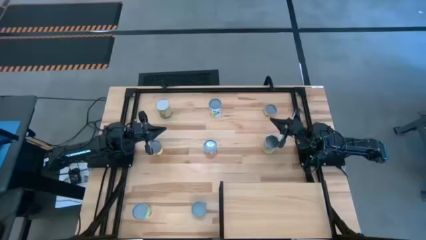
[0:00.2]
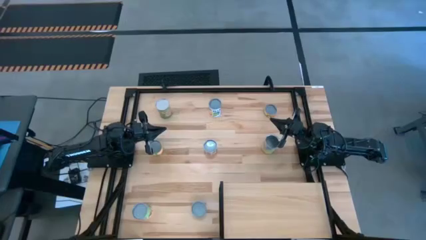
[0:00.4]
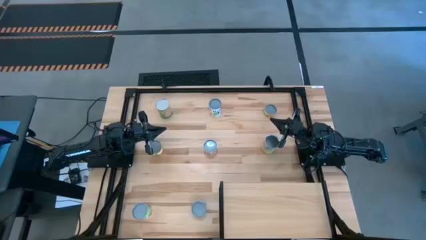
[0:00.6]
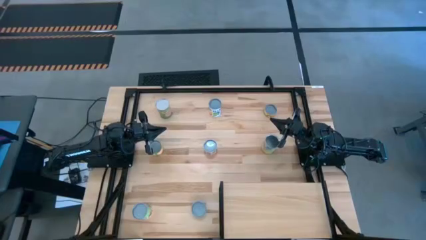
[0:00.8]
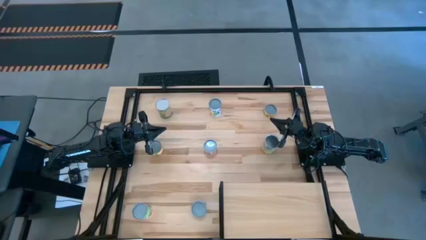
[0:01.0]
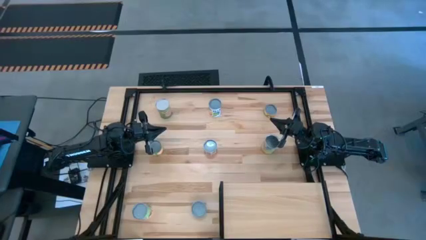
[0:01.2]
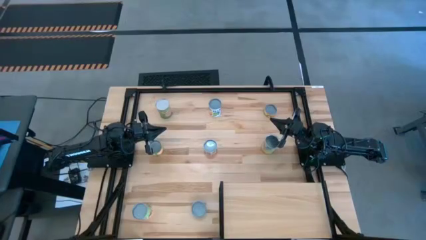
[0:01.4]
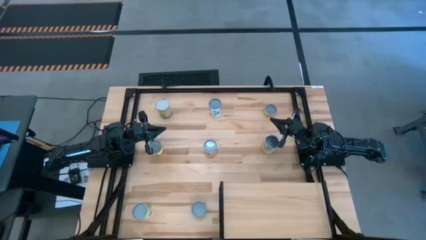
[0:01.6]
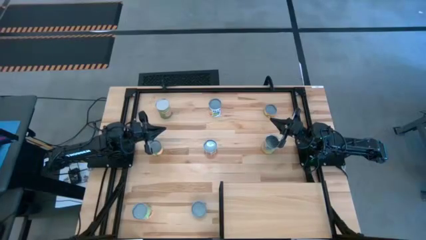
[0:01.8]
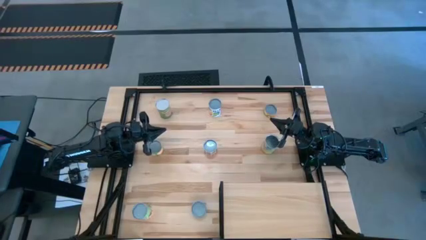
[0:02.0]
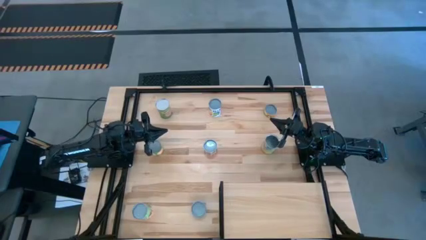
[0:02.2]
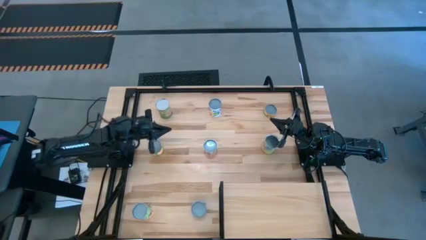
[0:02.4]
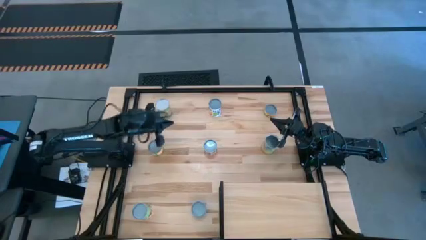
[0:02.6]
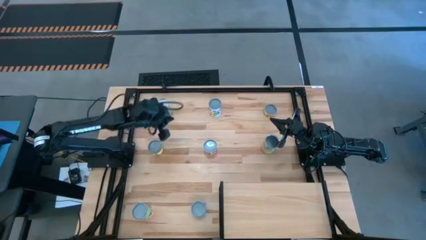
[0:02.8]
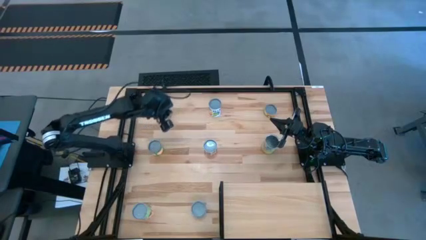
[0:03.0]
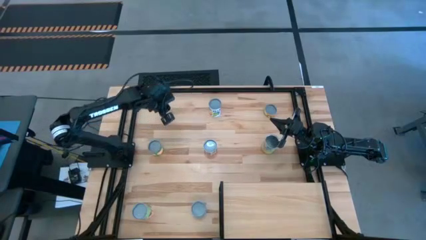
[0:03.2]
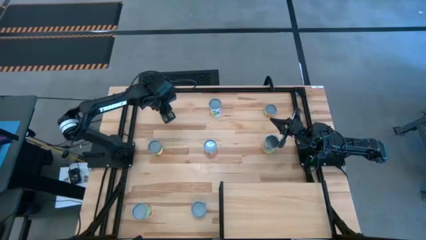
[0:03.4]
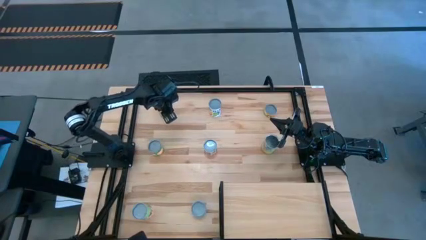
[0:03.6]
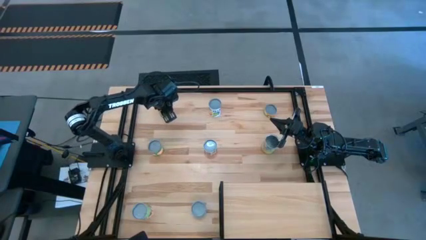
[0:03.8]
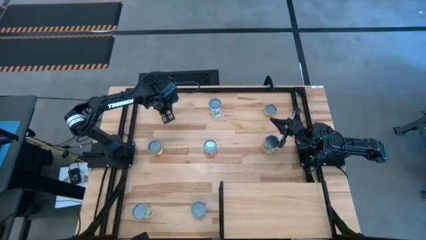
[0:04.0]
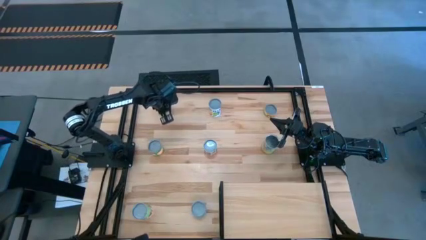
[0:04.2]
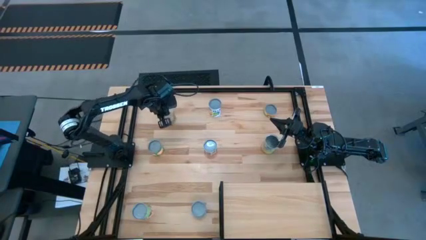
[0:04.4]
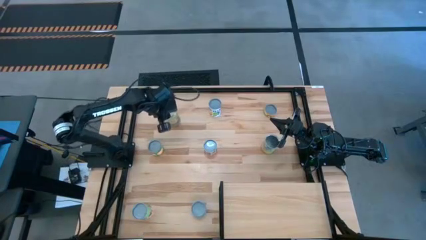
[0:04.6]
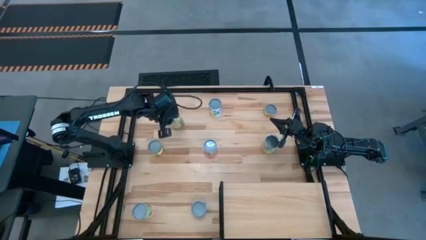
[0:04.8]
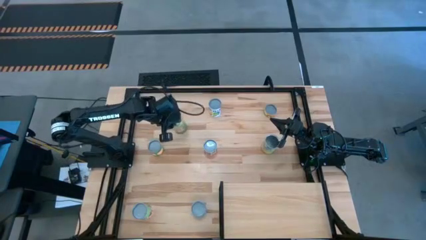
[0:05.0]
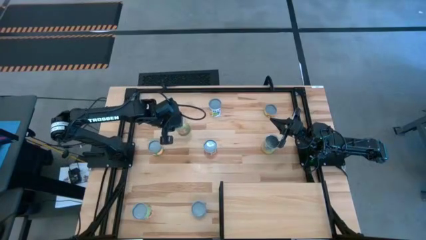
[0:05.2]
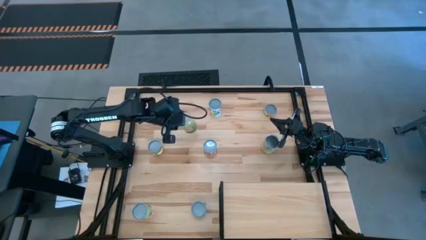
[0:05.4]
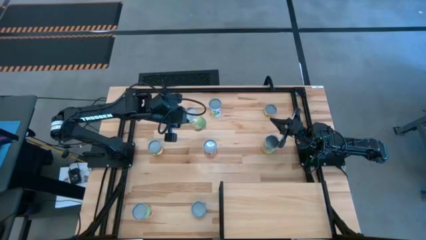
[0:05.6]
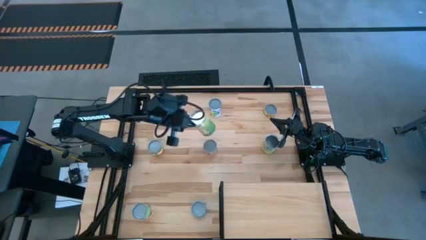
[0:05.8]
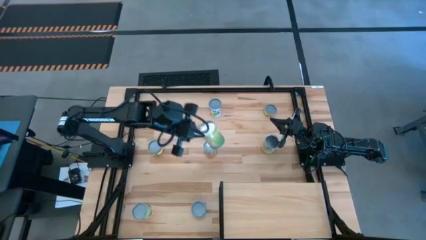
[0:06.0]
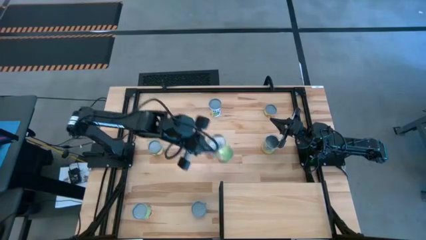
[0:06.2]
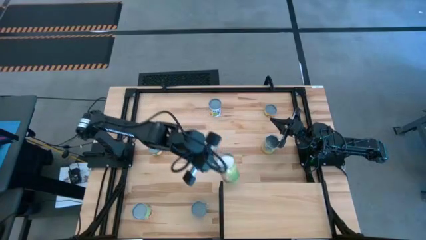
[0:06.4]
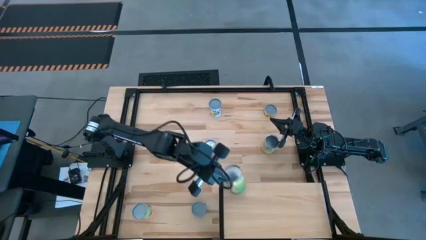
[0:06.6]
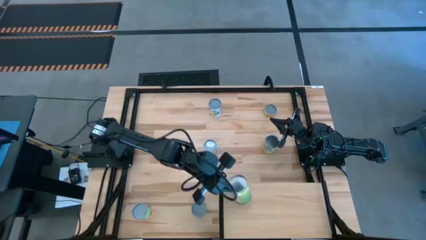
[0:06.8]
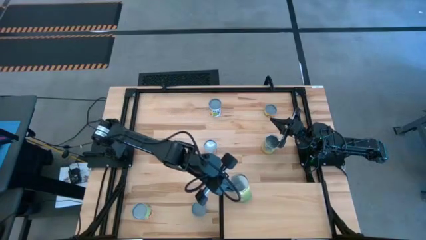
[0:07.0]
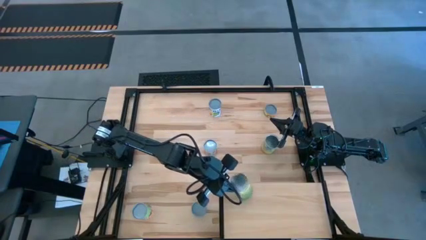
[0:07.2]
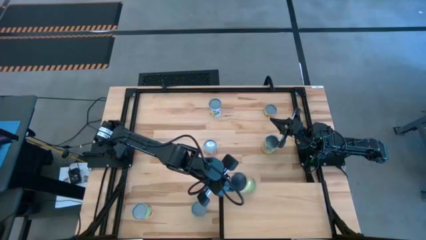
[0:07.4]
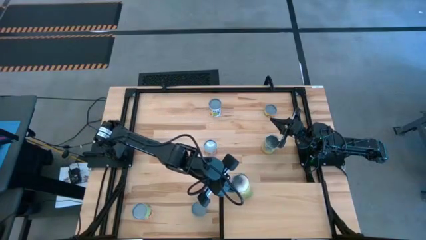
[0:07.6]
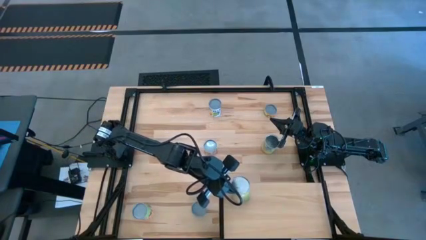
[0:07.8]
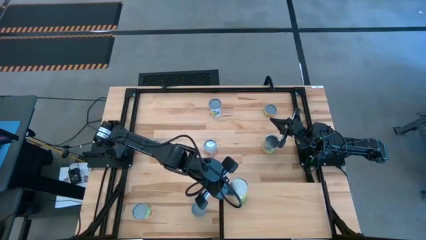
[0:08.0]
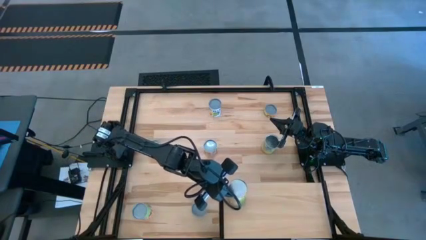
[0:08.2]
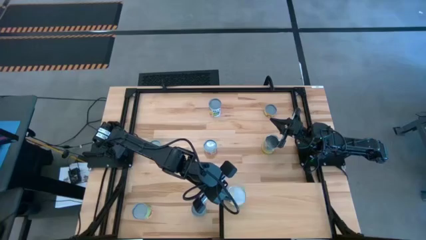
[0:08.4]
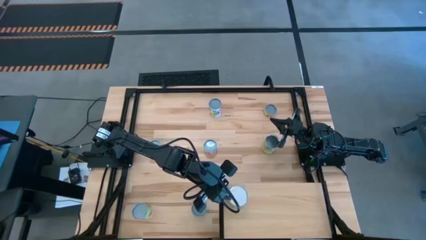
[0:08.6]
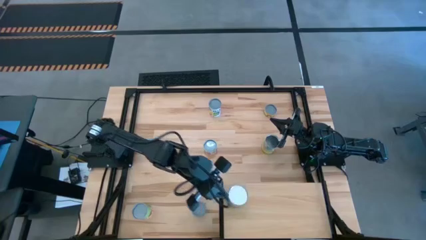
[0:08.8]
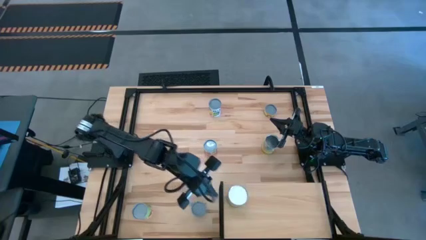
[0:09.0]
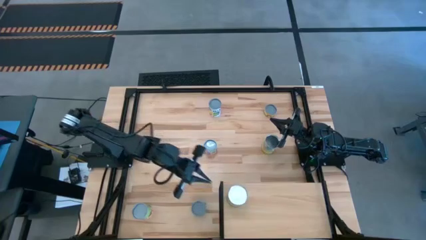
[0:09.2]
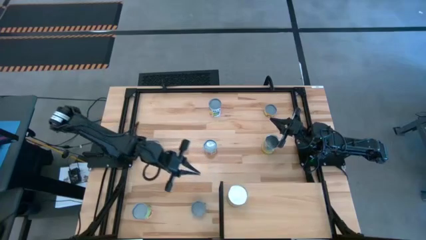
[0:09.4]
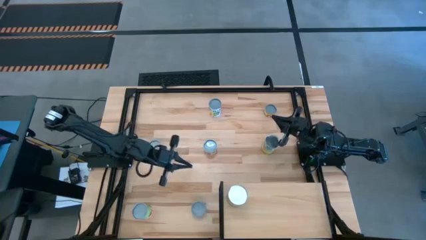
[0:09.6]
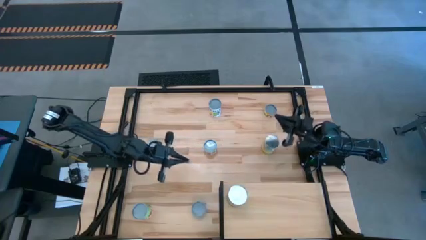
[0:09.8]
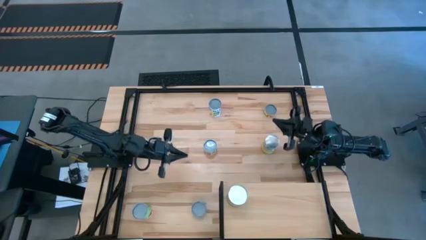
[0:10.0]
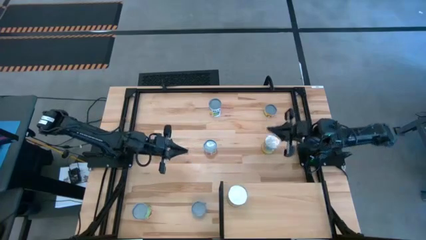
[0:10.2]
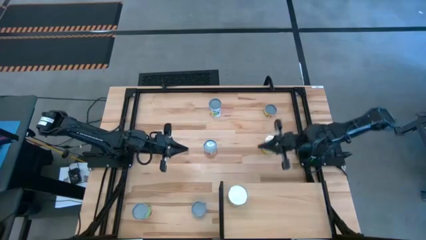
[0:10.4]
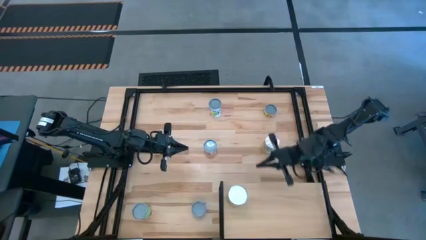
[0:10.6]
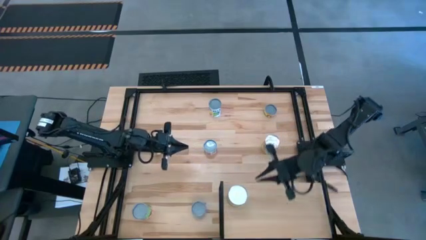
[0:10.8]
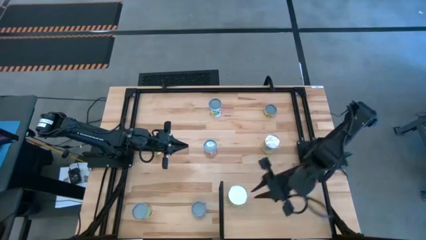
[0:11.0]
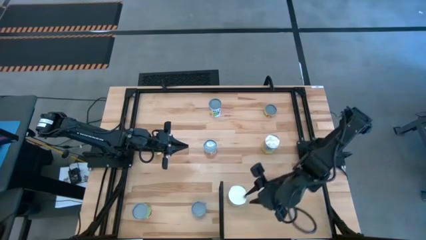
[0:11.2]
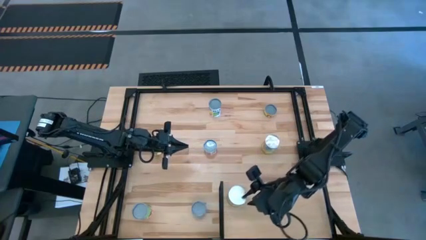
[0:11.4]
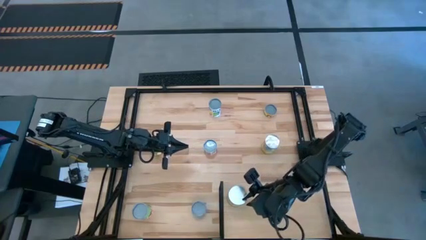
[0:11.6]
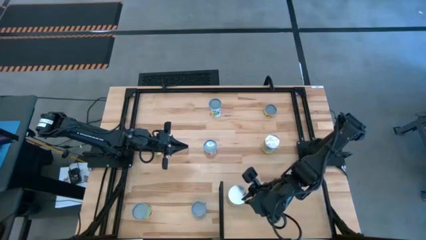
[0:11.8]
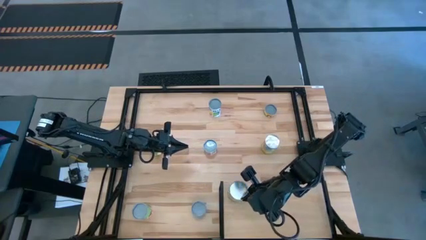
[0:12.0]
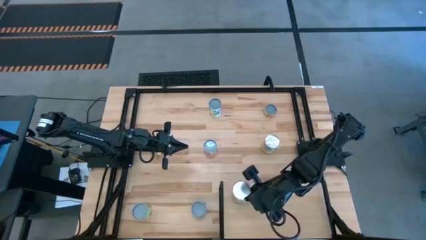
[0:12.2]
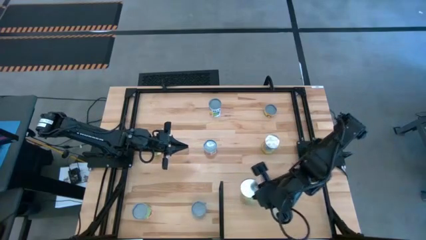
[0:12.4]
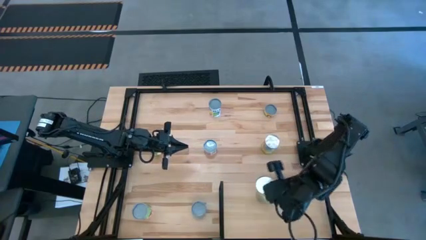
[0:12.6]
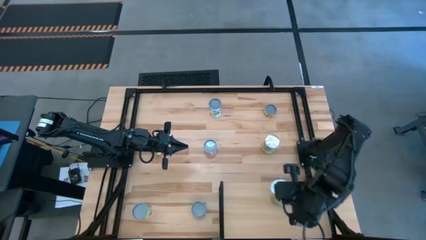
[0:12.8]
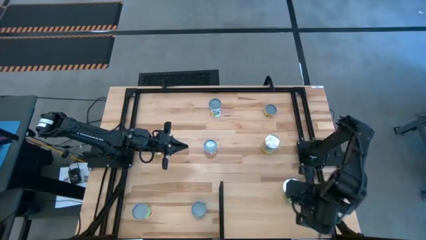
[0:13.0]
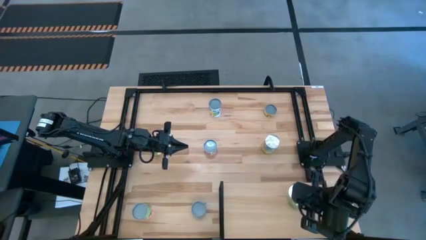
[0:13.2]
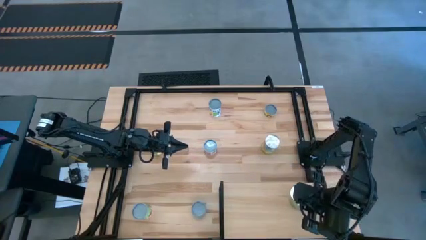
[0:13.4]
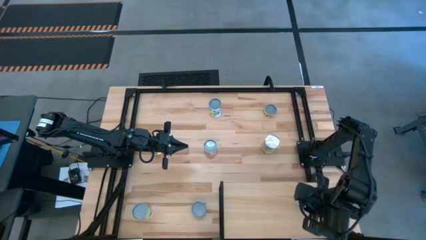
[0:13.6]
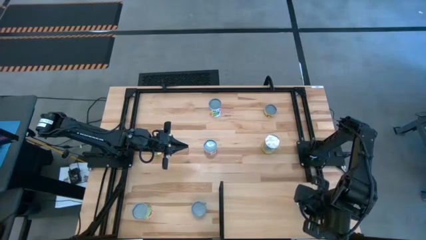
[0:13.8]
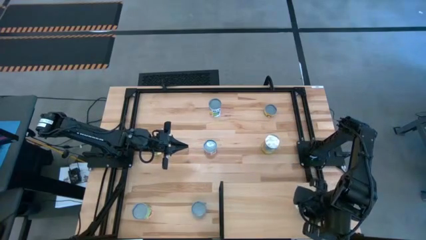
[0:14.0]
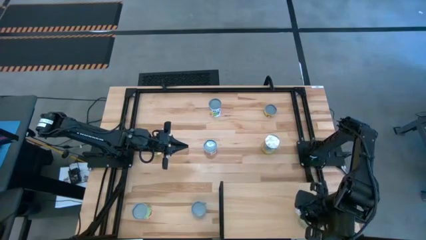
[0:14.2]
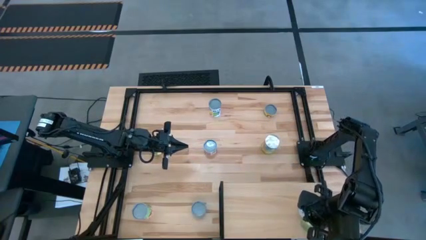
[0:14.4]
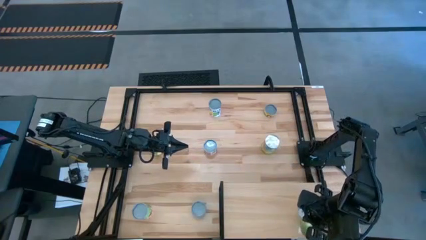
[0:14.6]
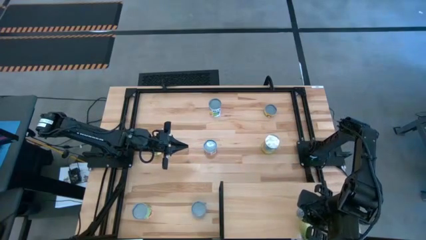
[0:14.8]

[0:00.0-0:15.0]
Task: Pick and place cans onto a shelf
Put the canned oranges on the shelf
